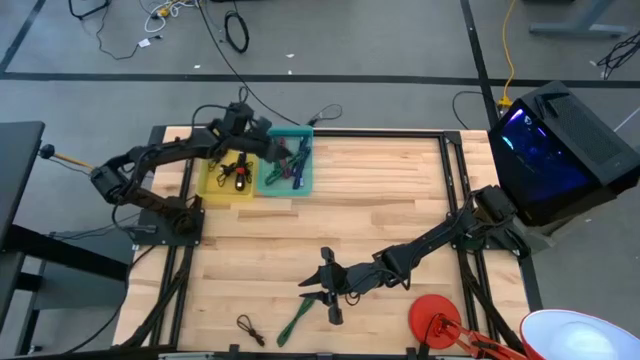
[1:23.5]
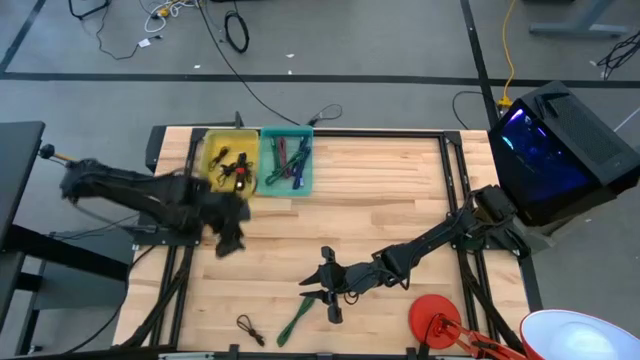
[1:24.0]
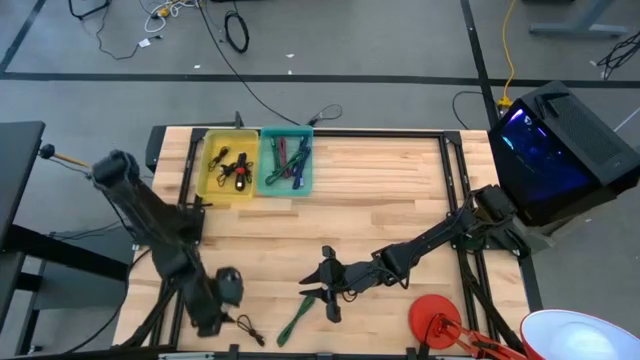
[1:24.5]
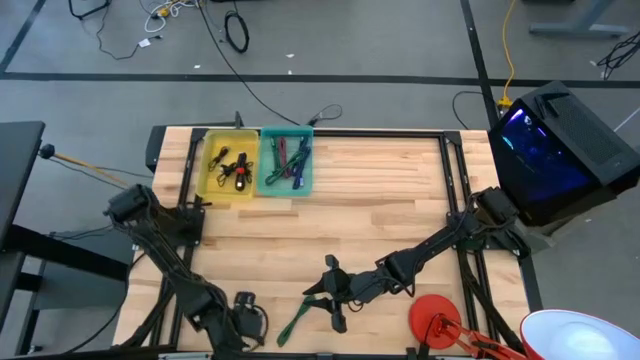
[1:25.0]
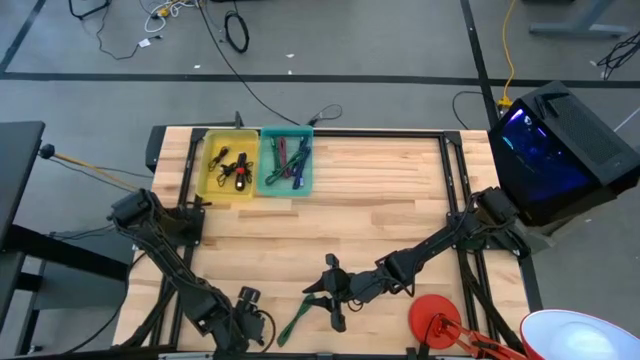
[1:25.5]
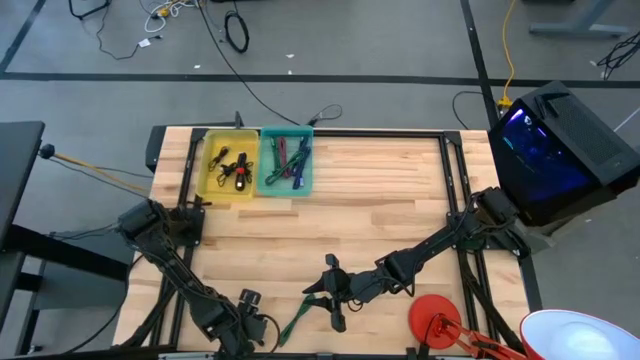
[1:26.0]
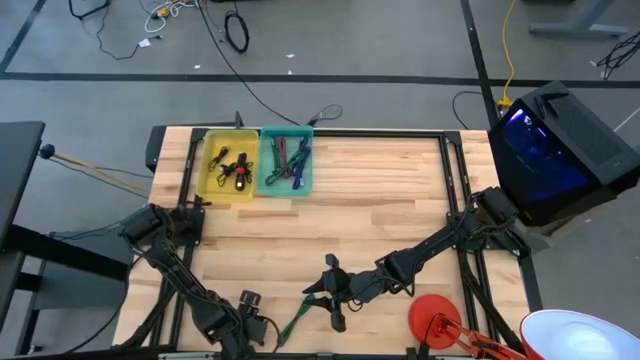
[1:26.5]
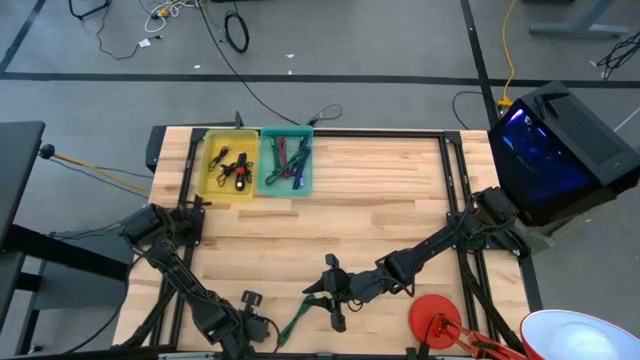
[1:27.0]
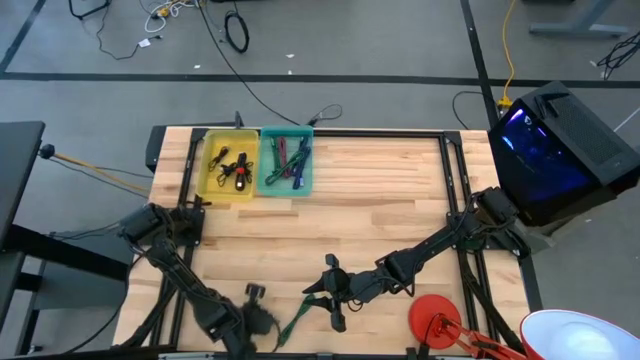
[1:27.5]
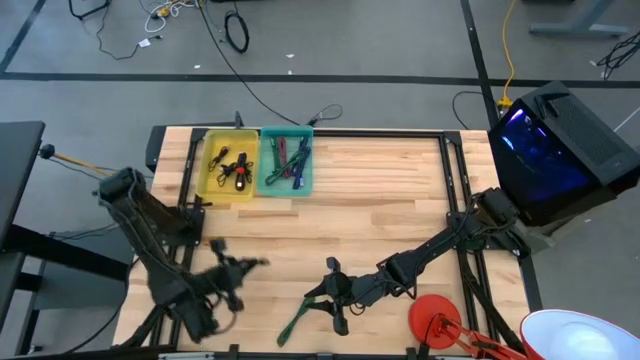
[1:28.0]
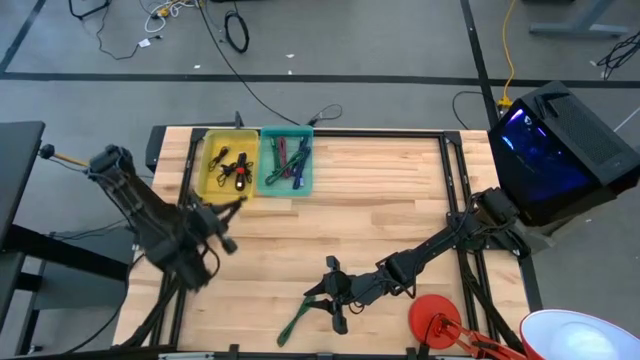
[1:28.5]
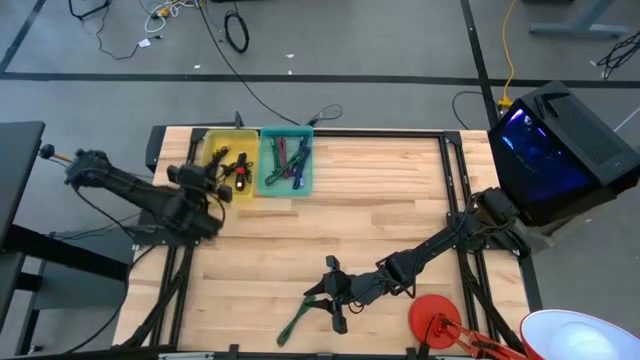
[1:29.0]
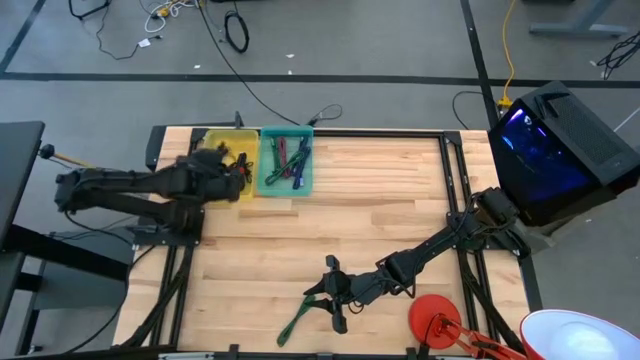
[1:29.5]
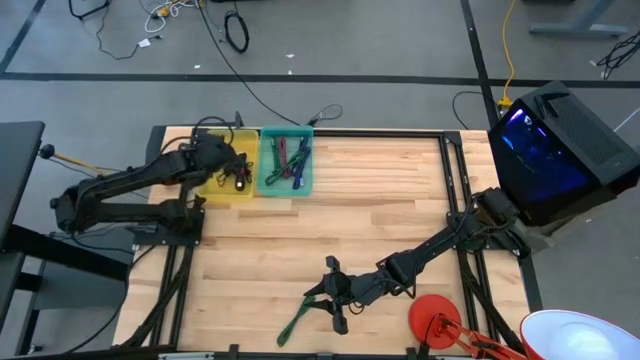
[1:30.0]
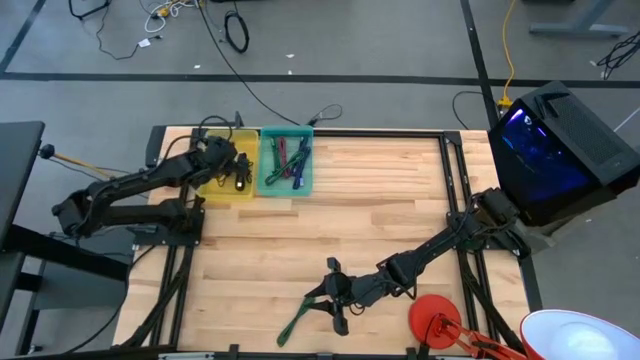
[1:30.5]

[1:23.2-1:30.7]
Task: Pick & Place USB Port
Put the black charger cable into the yellow bin

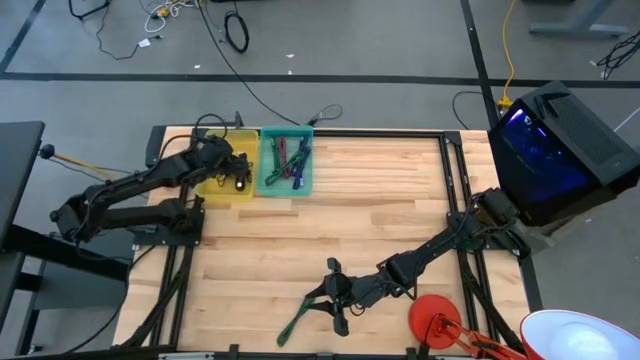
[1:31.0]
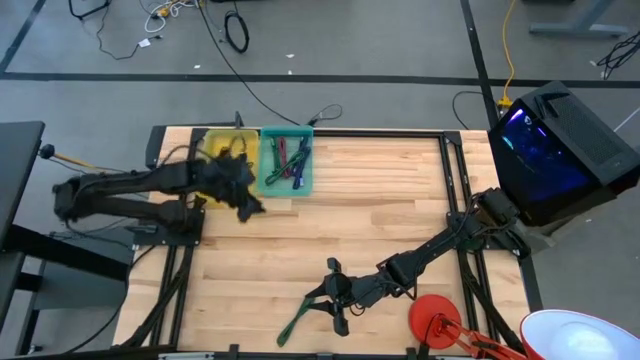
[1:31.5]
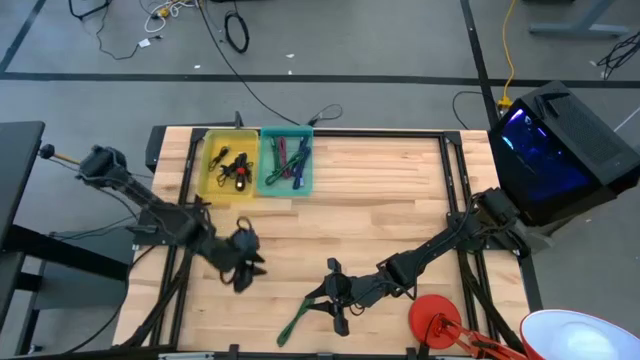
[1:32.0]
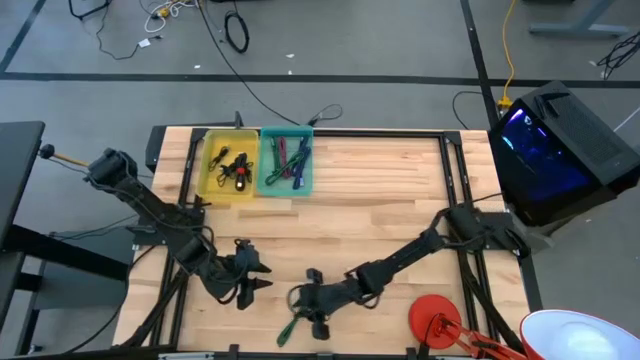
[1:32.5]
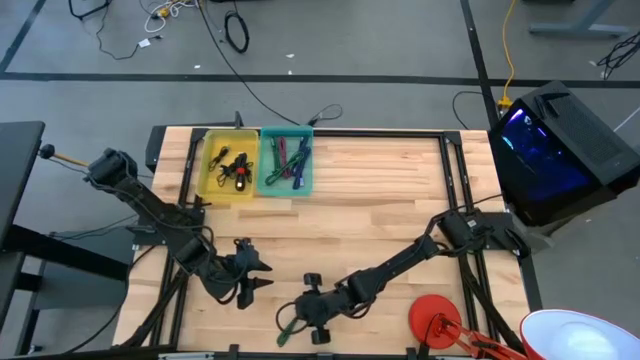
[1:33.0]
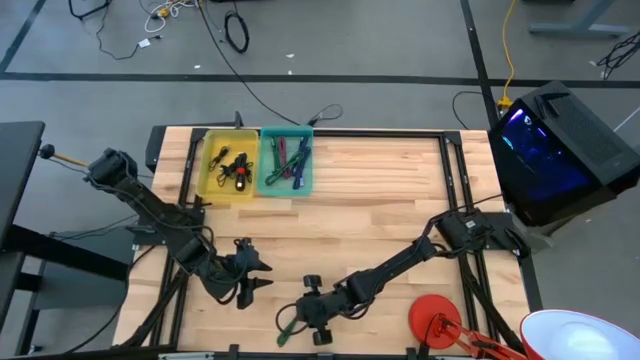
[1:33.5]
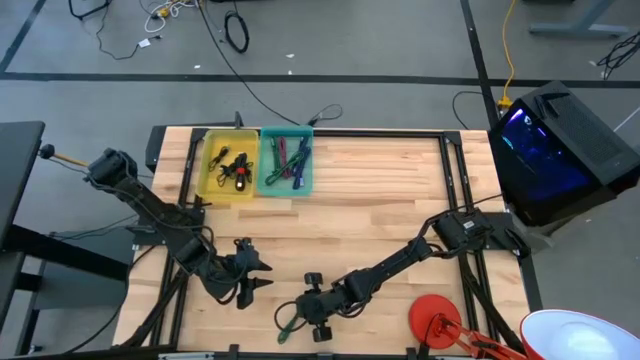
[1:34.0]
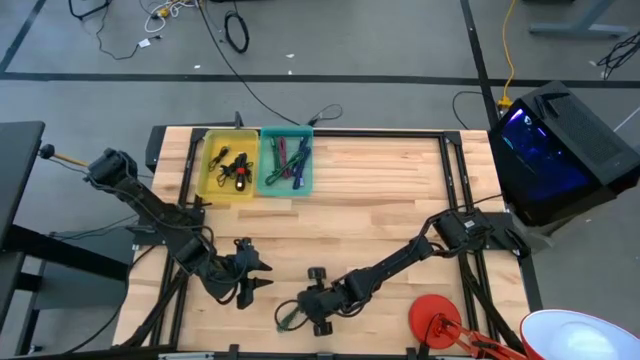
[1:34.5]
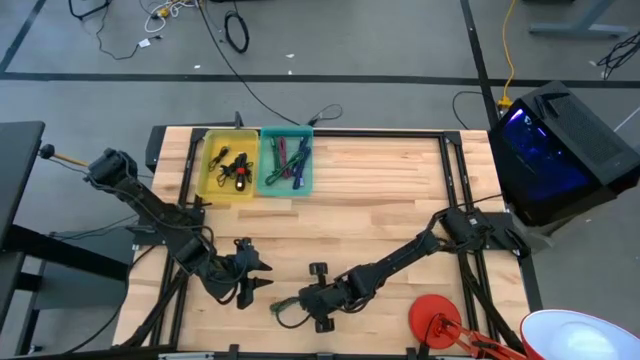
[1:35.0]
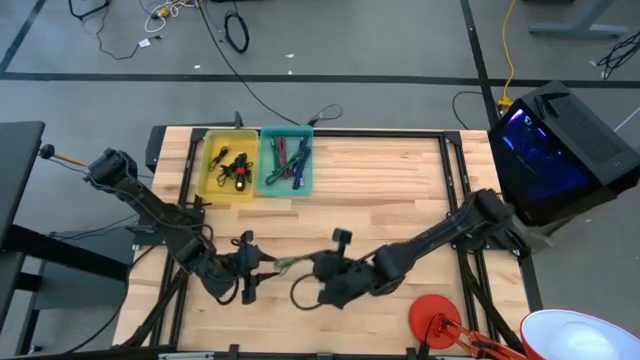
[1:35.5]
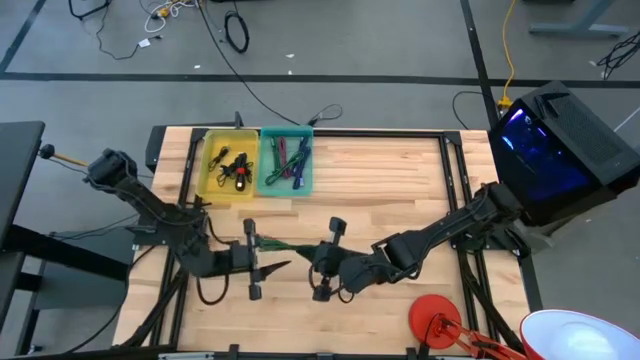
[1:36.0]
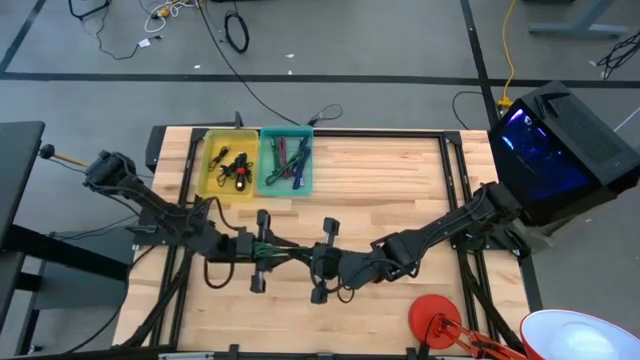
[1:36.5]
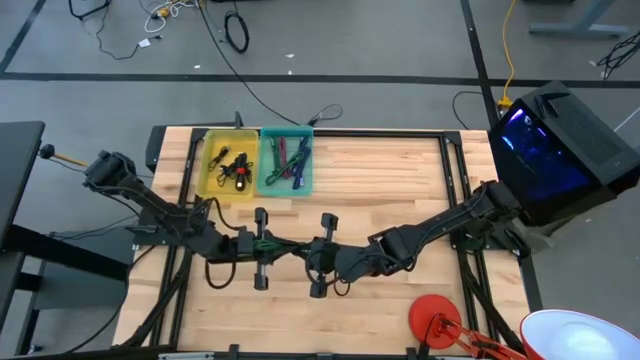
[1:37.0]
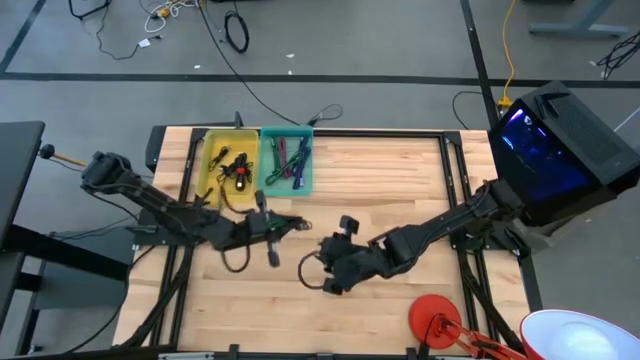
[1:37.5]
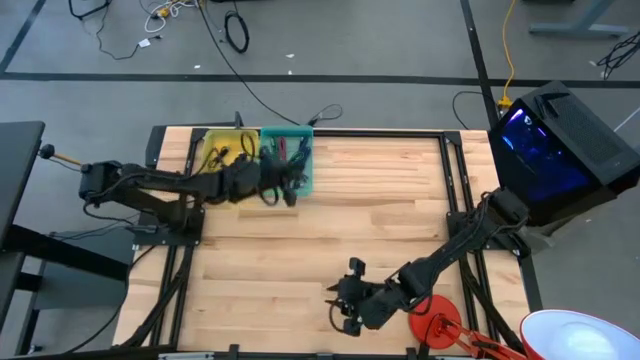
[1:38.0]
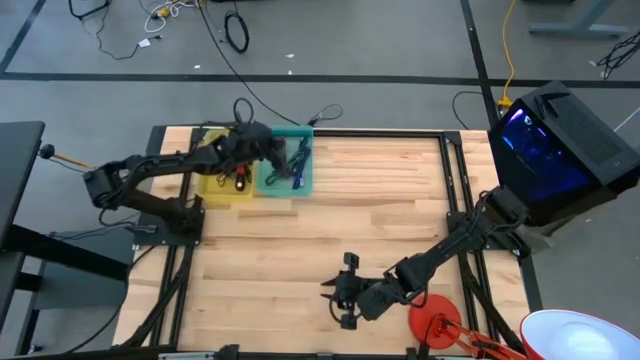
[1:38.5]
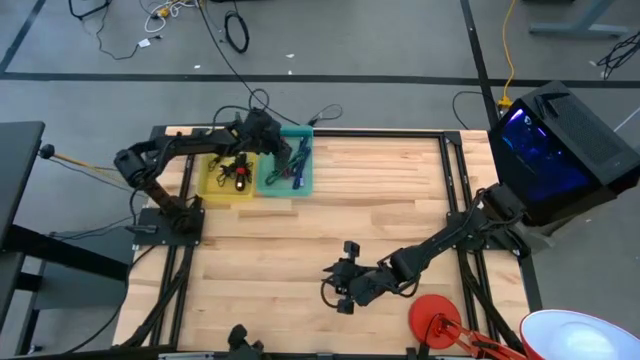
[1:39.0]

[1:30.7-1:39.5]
Put the green charger cable into the green bin

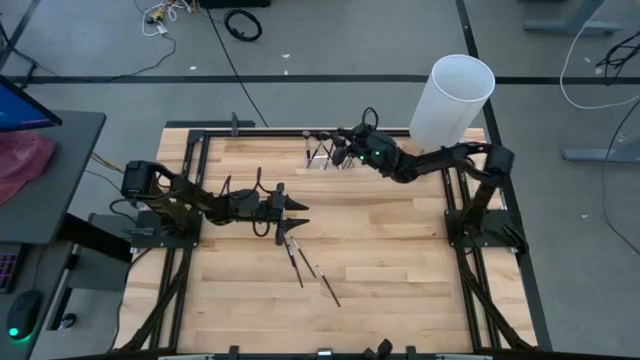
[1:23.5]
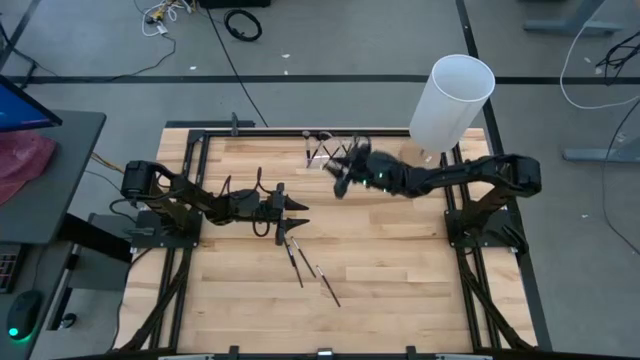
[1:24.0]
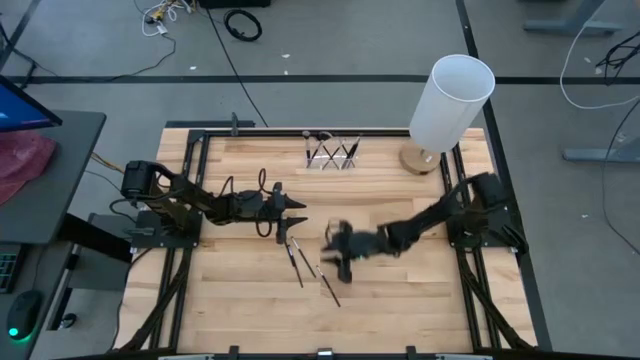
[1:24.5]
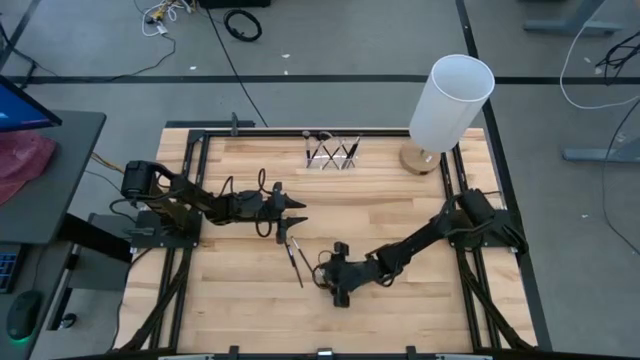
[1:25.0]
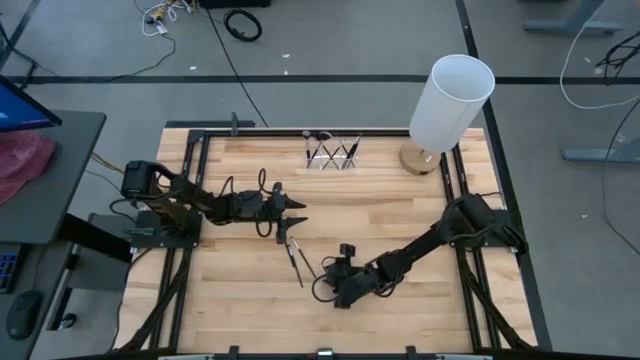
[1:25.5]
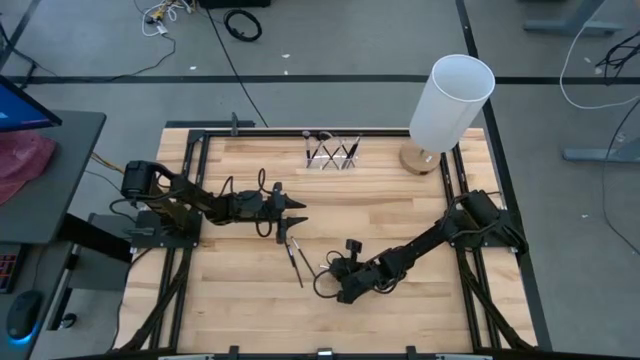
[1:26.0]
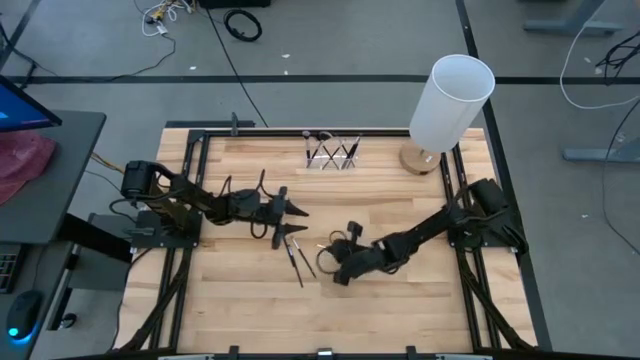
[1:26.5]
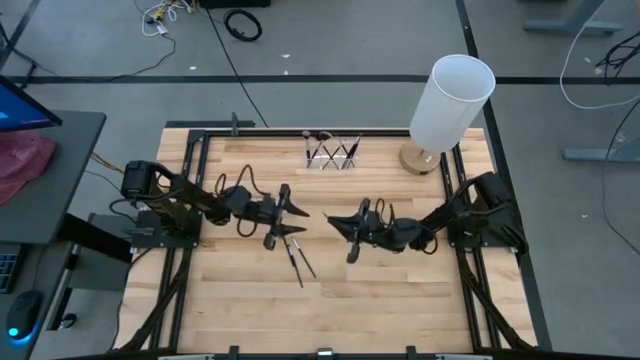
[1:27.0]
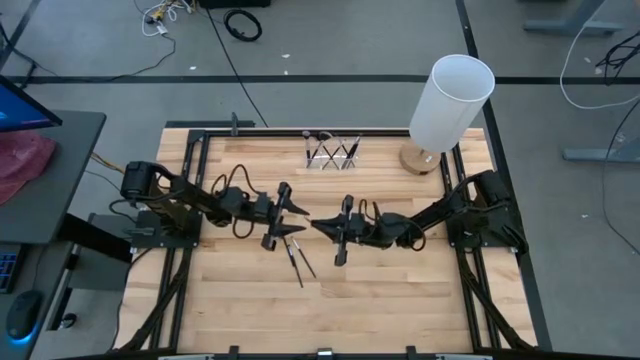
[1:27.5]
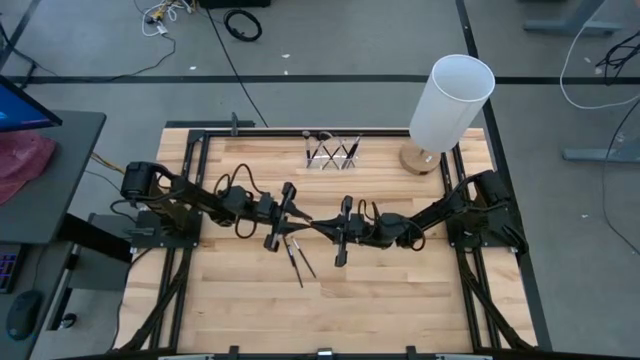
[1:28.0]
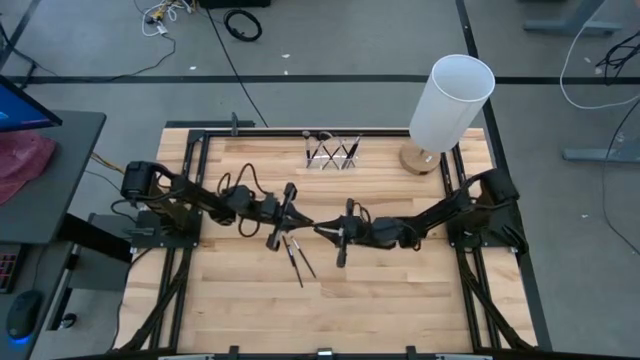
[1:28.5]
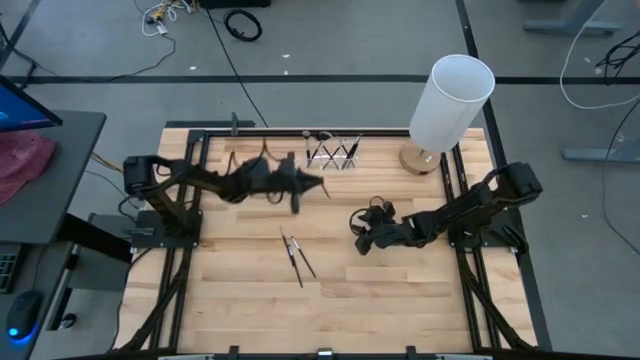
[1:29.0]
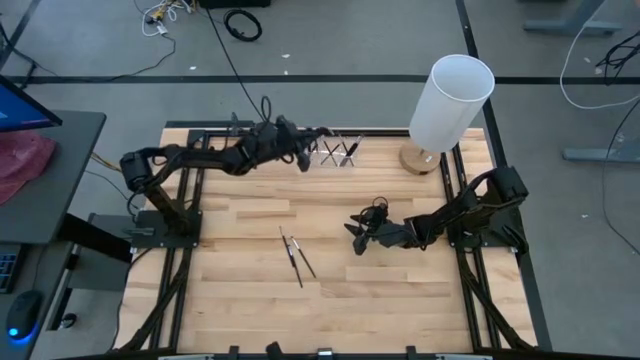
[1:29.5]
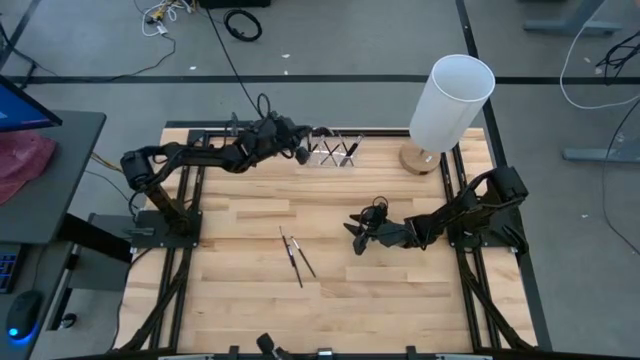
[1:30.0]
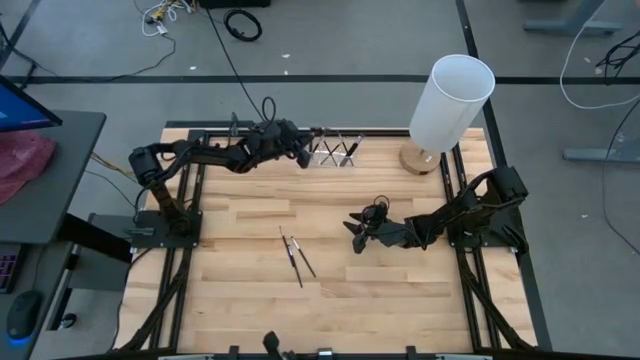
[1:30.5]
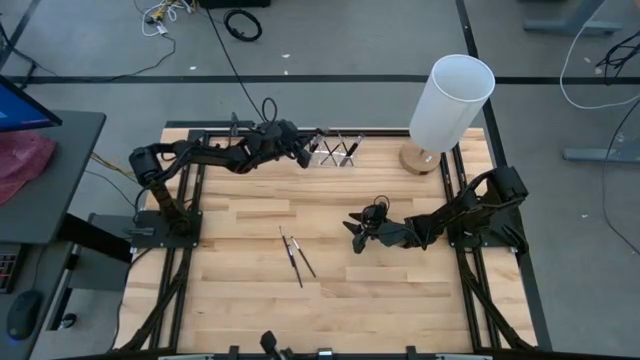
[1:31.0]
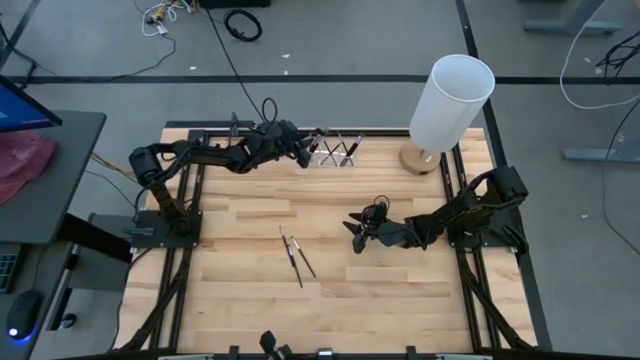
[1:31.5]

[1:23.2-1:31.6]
Task: Pick & Place Makeup Supplies
Put the black makeup brush into the transparent organizer
